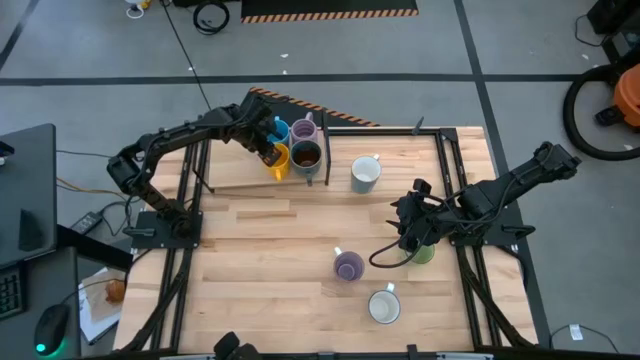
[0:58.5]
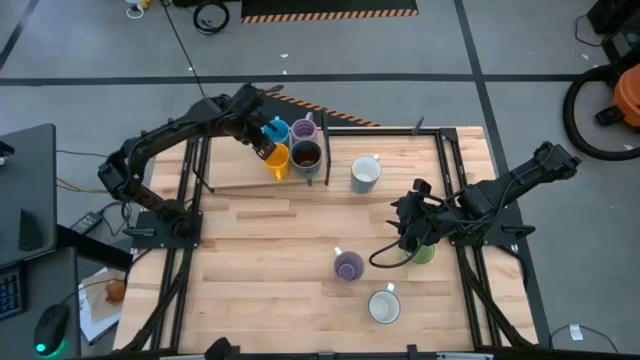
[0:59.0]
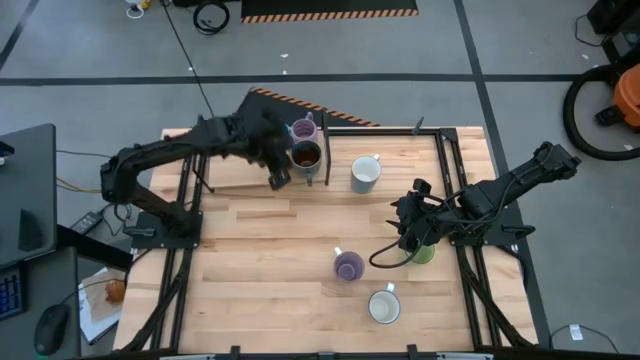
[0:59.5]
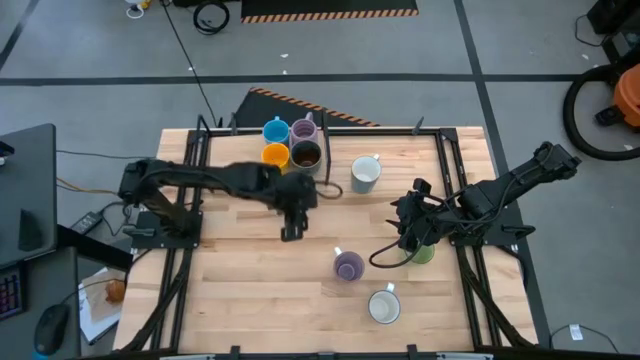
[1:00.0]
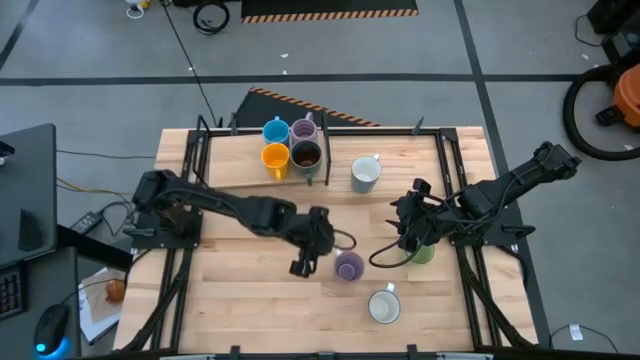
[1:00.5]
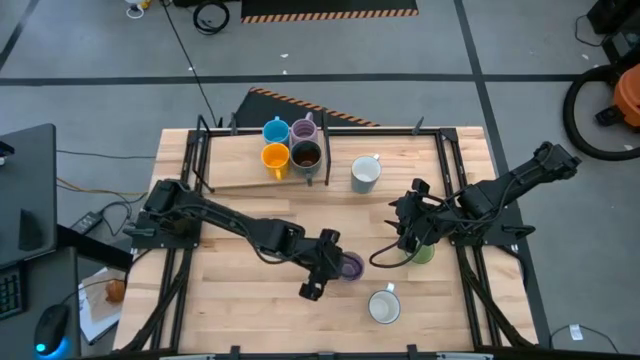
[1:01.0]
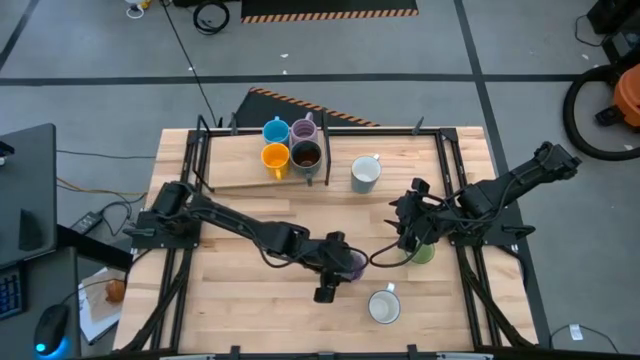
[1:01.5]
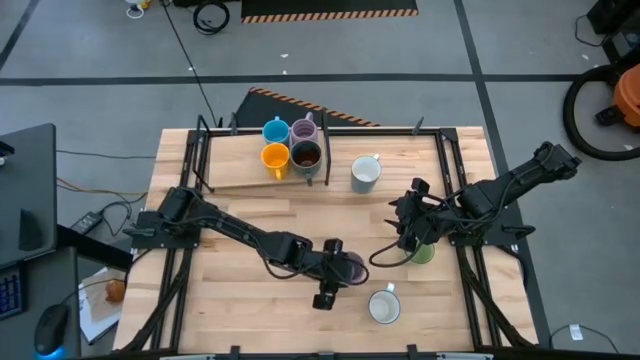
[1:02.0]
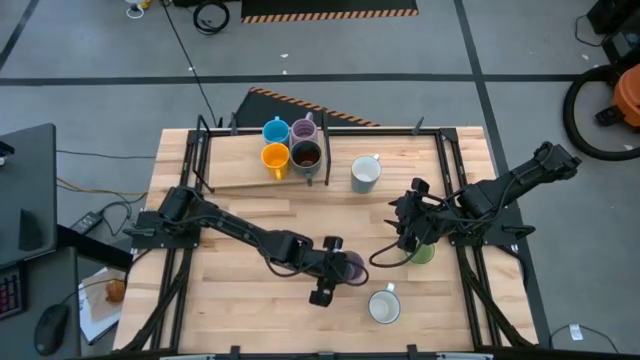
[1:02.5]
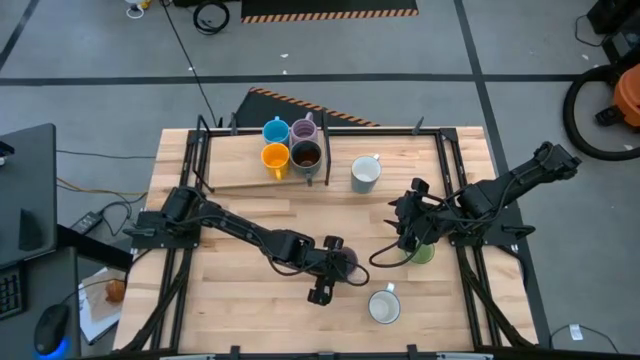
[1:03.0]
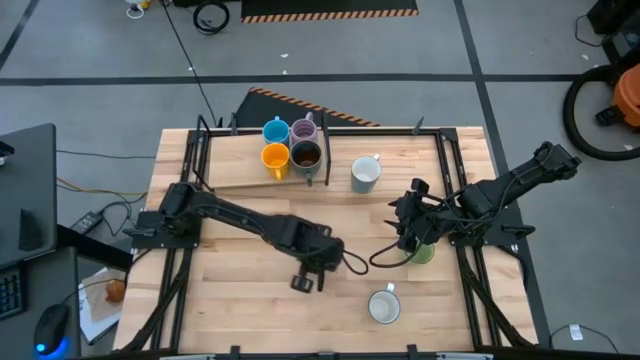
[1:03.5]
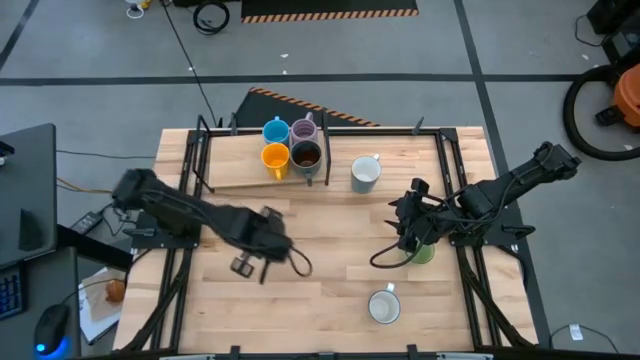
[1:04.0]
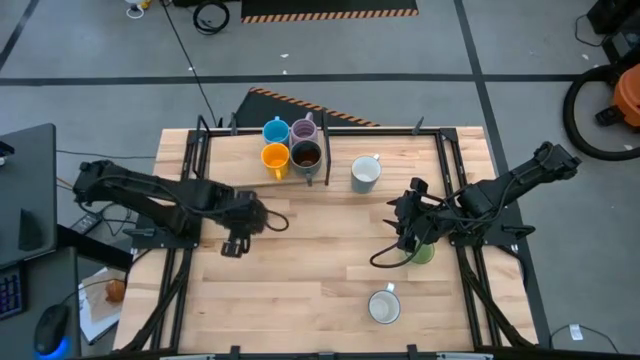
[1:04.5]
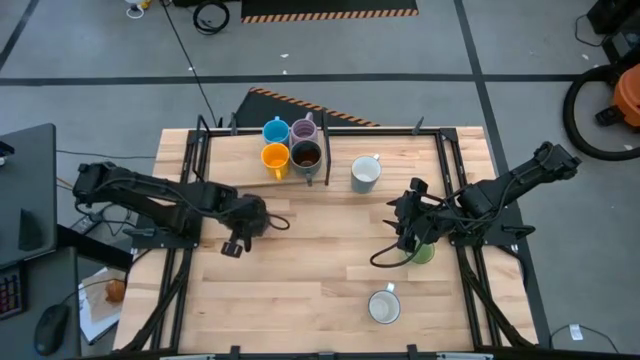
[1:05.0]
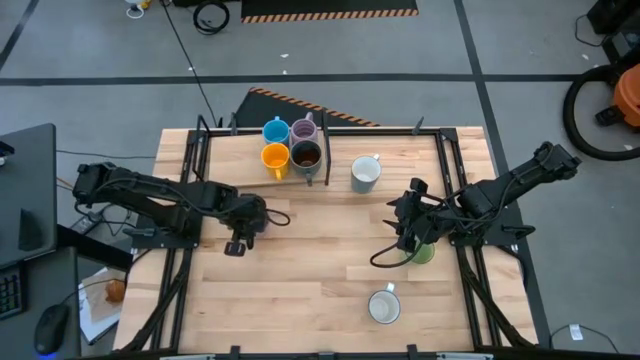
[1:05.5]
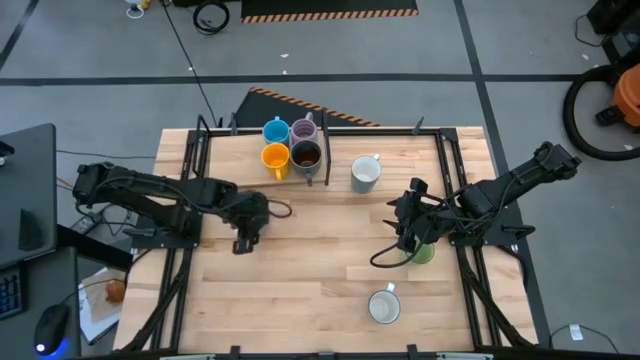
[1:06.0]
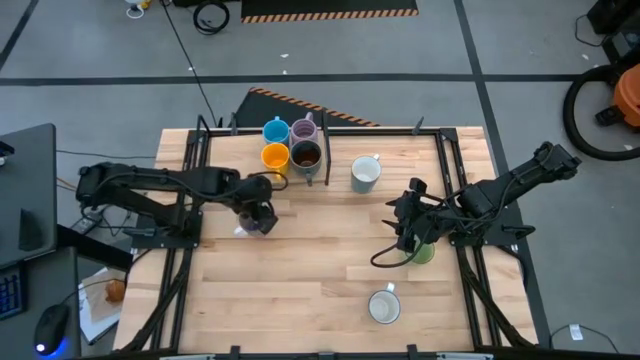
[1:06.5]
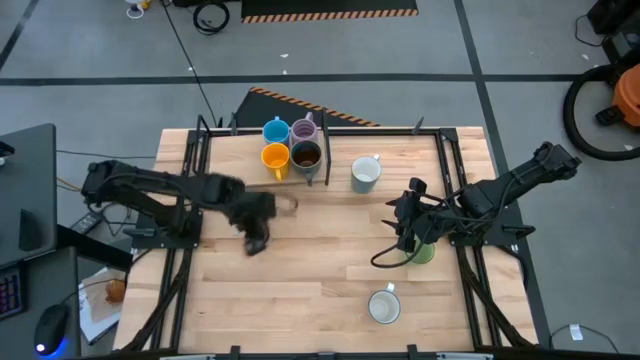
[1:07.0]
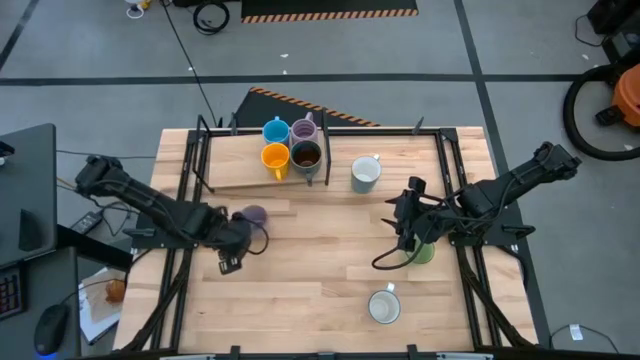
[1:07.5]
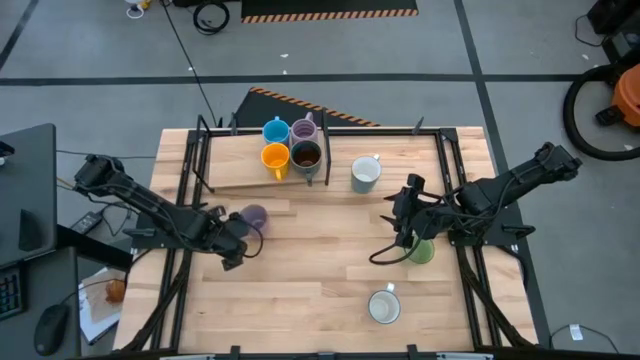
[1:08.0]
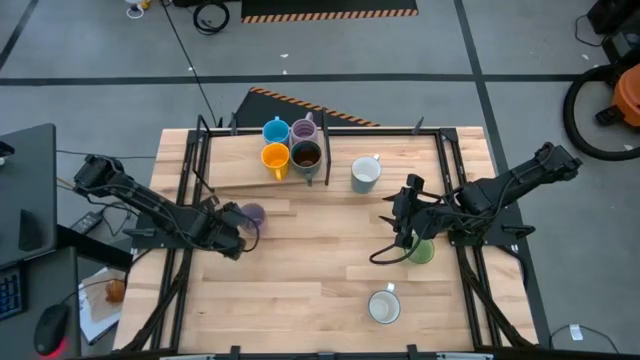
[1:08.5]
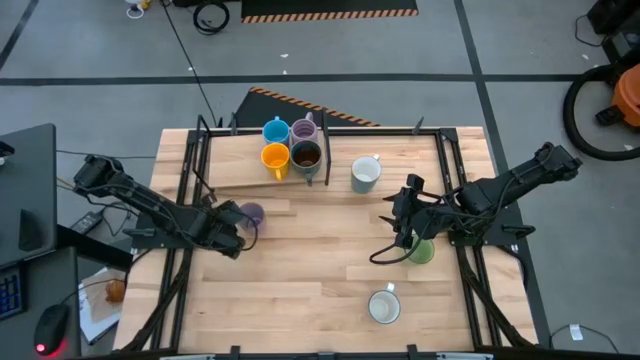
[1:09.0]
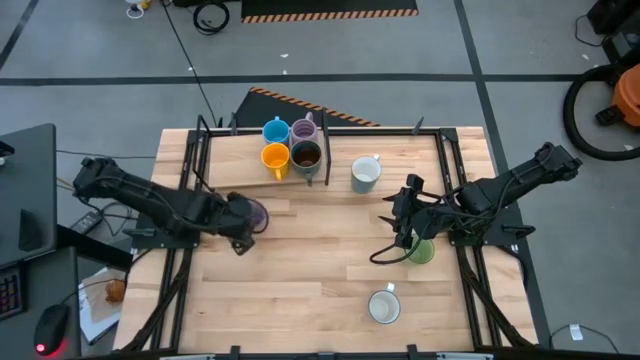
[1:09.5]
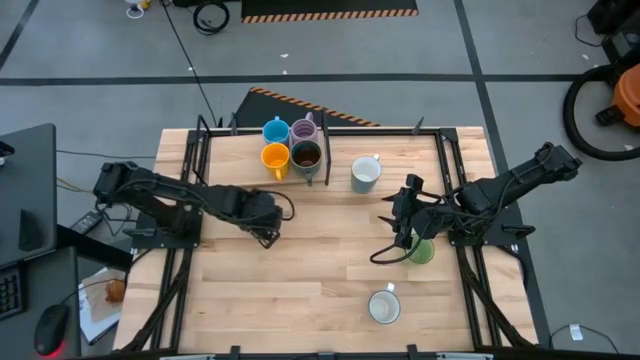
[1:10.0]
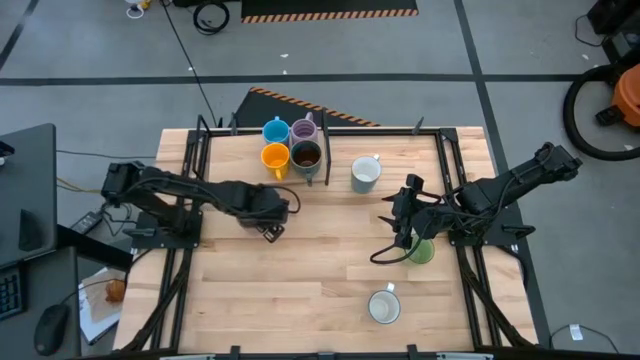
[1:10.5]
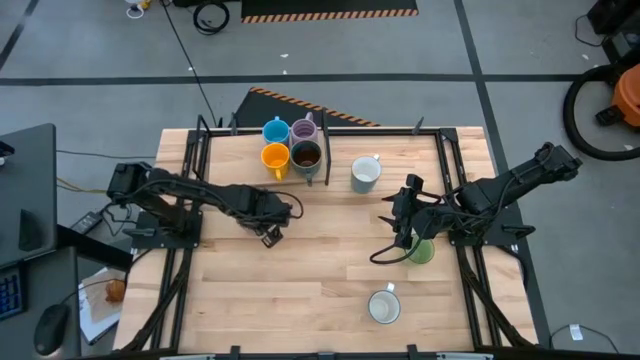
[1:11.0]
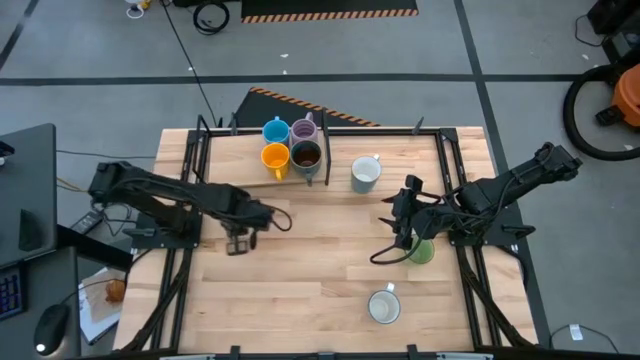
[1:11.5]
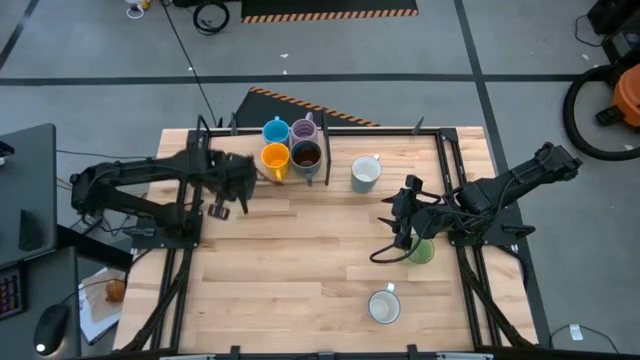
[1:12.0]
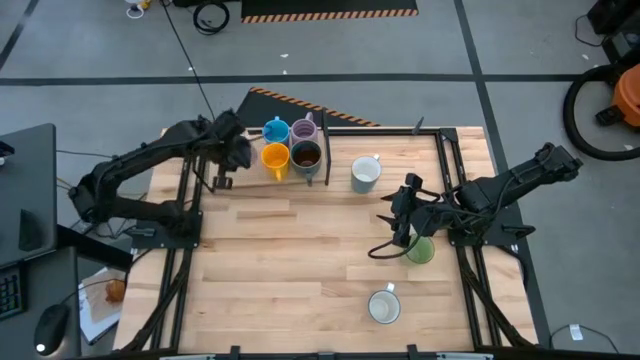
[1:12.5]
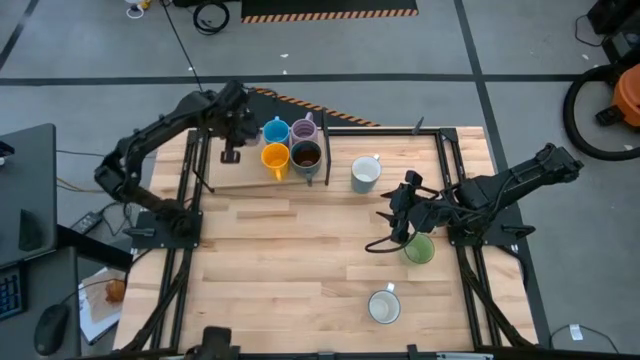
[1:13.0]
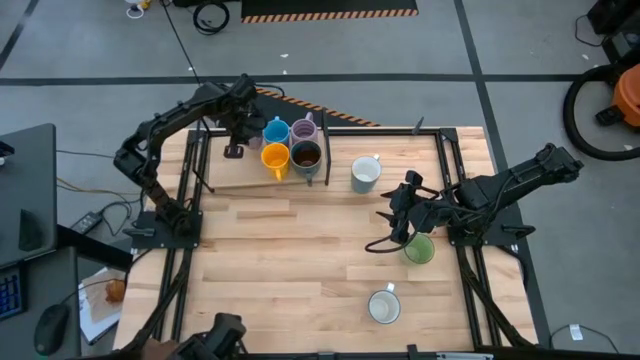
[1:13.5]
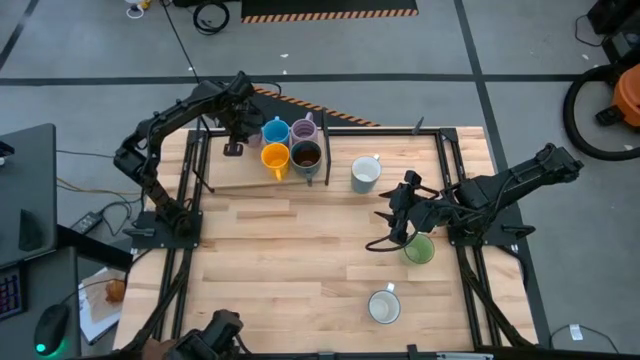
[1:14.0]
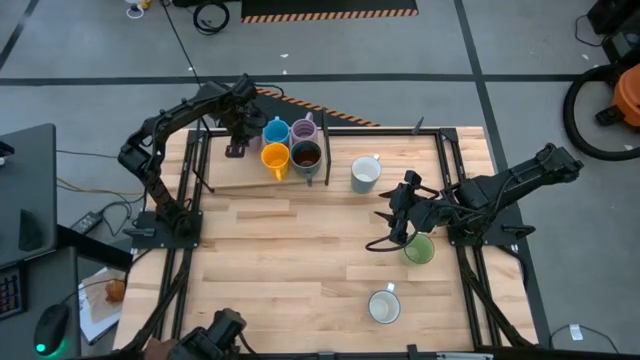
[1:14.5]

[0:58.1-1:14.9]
Task: Place coffee mugs
Put the purple-white mug on the shelf
